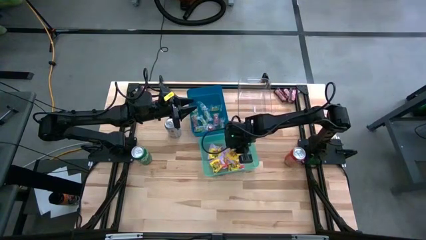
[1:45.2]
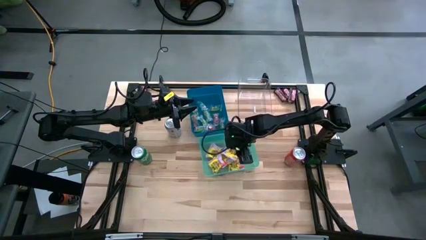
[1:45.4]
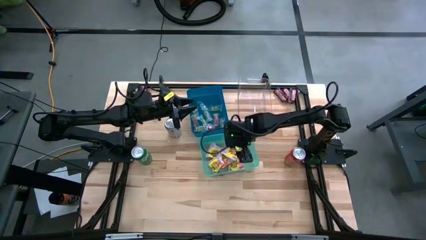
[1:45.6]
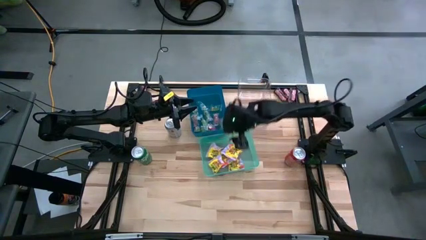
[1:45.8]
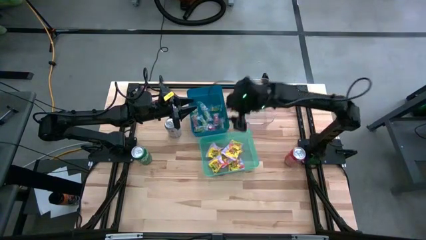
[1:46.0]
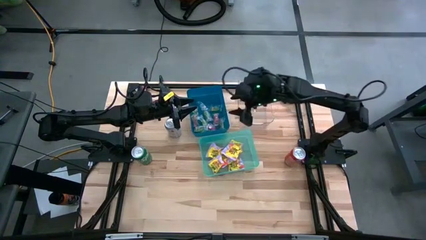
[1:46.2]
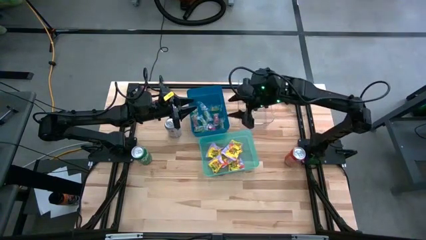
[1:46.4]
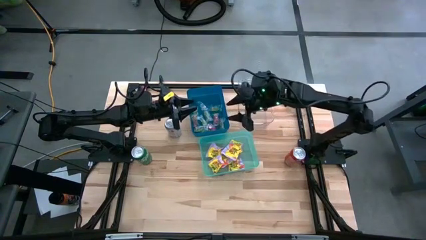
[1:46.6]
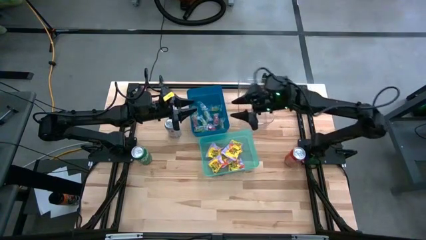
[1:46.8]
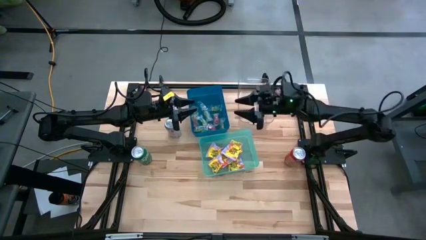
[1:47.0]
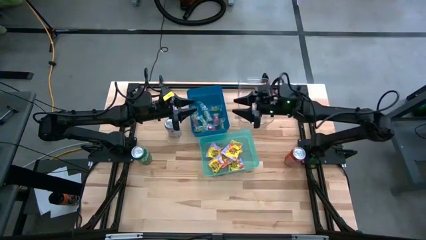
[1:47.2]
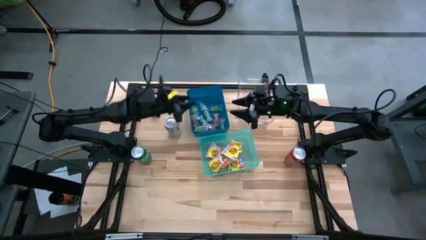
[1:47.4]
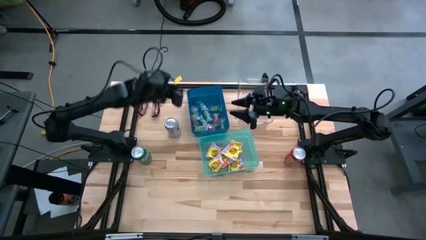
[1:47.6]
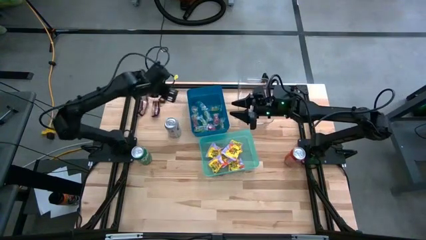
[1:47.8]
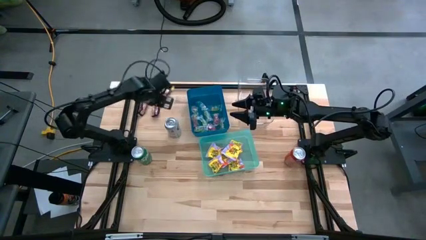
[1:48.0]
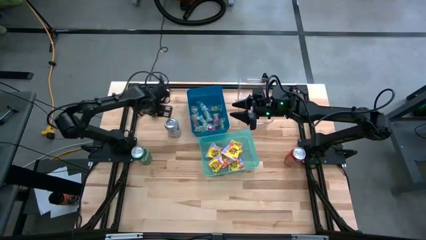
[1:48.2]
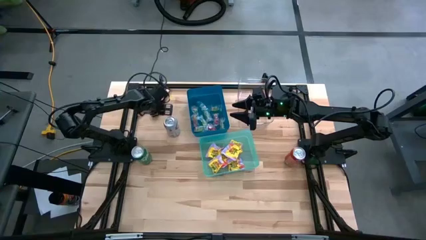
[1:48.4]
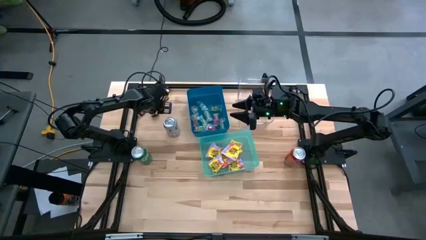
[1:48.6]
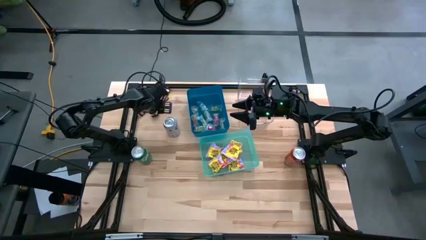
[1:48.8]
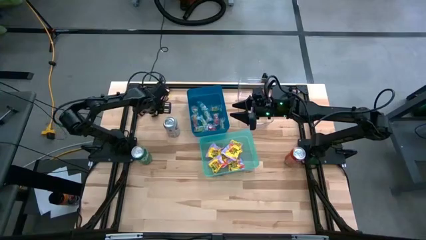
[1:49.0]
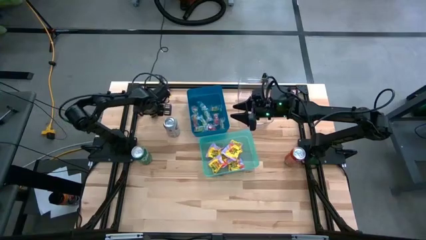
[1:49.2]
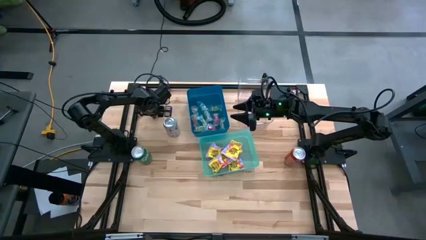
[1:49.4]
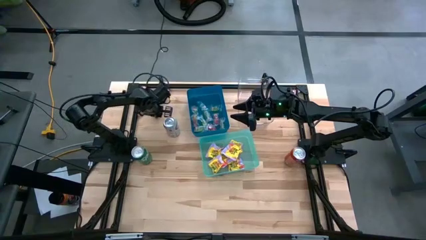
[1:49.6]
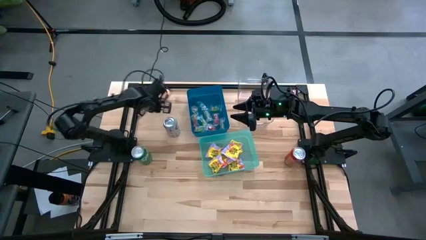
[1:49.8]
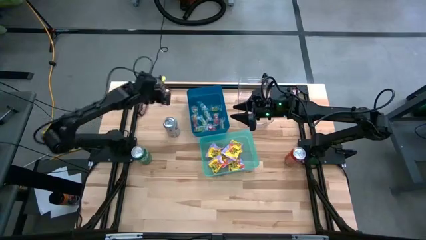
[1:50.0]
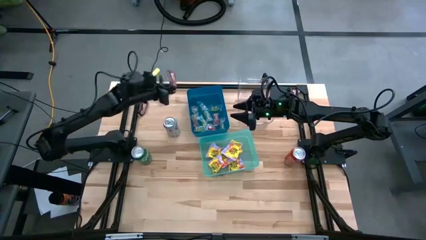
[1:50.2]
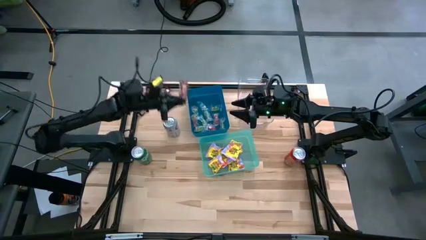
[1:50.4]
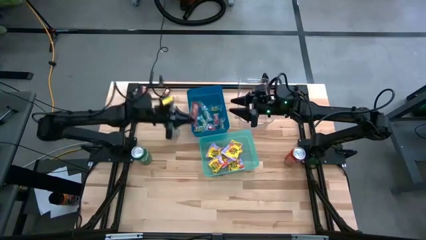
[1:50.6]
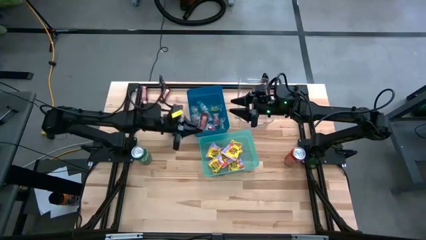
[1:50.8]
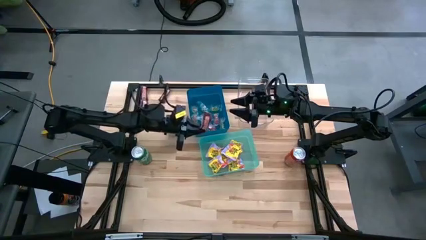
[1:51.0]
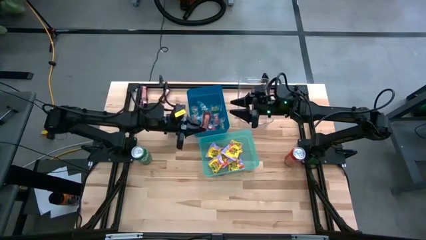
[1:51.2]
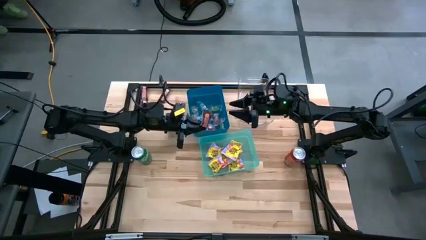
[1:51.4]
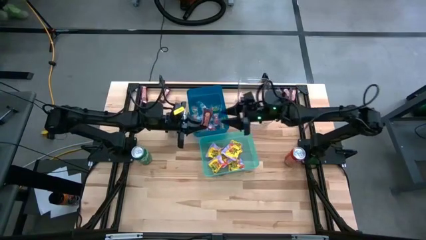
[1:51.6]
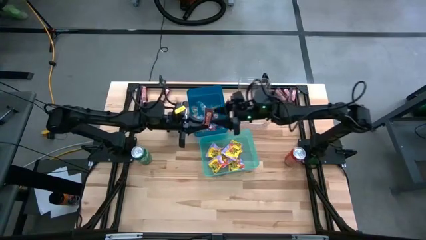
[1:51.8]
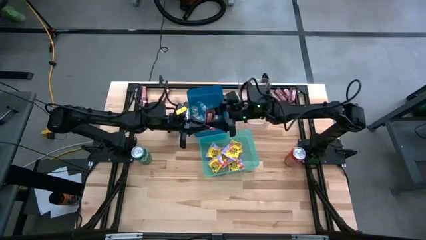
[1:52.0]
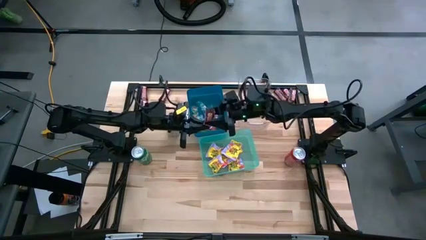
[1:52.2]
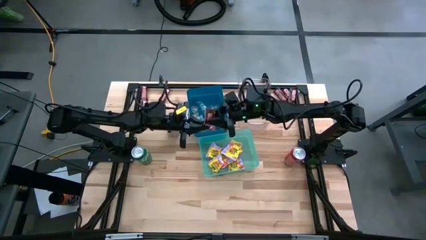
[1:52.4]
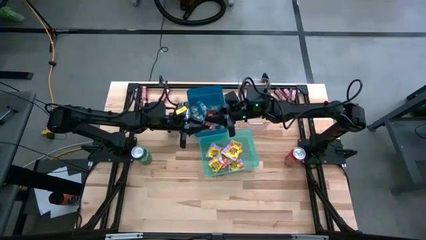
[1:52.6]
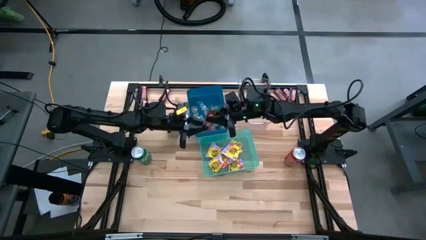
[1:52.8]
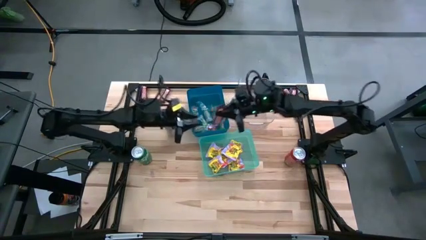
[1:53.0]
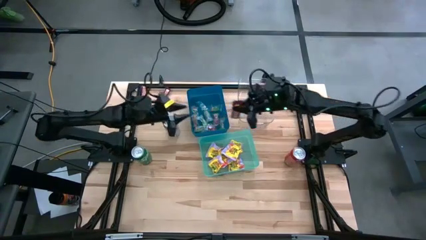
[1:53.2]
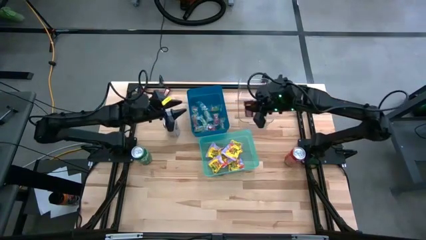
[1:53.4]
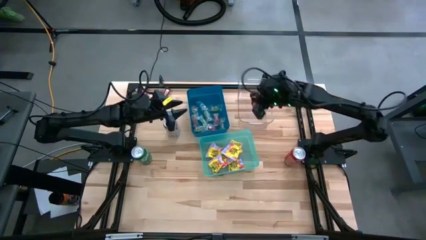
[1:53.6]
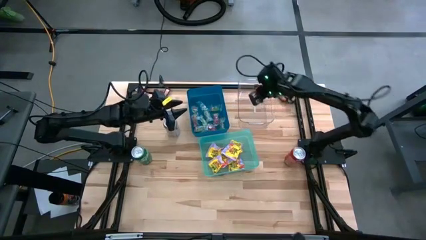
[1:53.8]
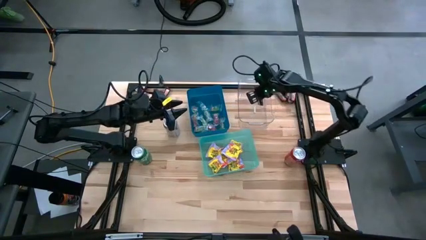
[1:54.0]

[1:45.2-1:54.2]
Task: Sort candy
Put the brown candy into the transparent bin

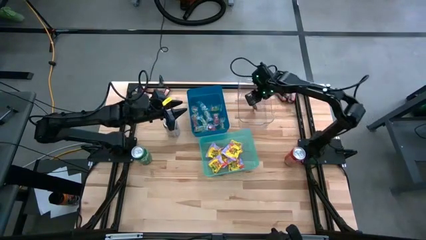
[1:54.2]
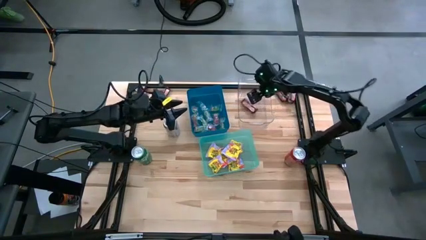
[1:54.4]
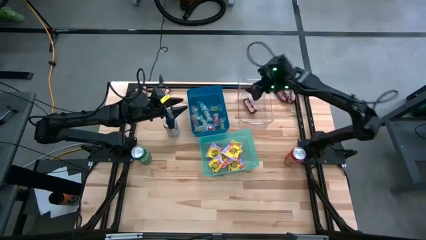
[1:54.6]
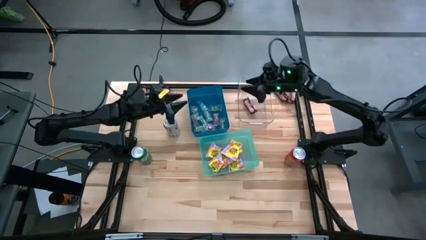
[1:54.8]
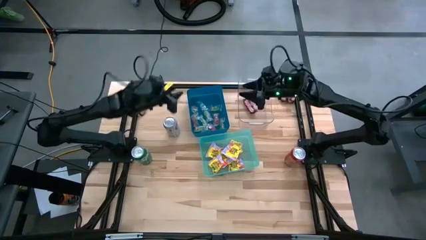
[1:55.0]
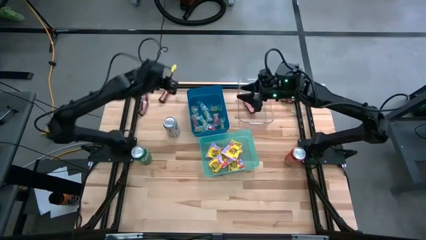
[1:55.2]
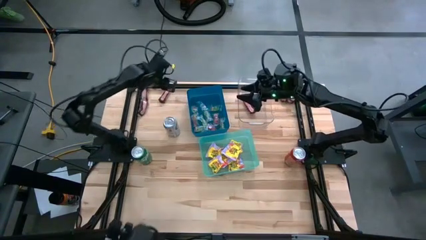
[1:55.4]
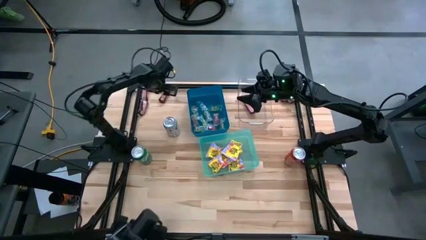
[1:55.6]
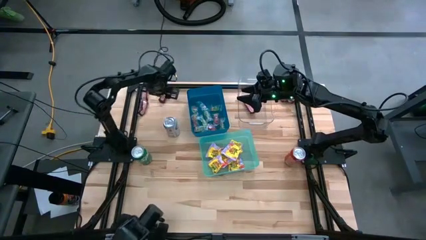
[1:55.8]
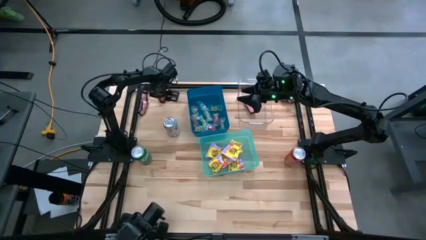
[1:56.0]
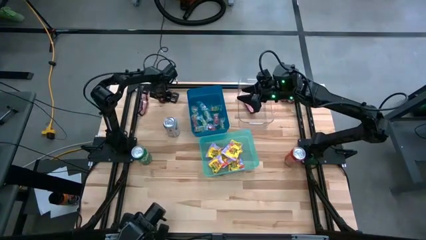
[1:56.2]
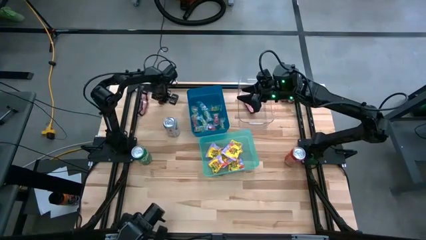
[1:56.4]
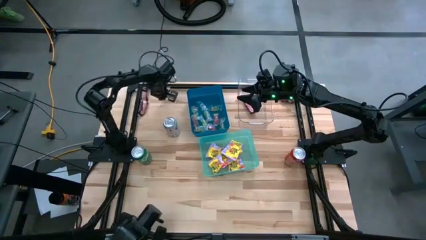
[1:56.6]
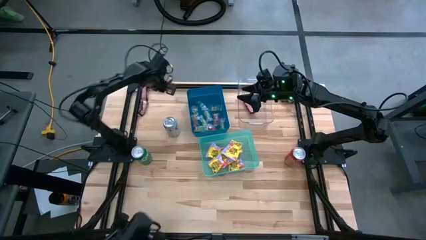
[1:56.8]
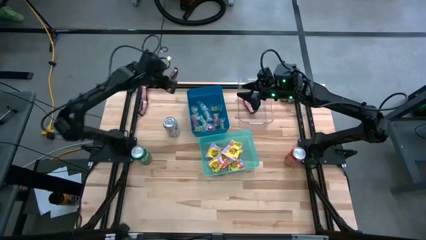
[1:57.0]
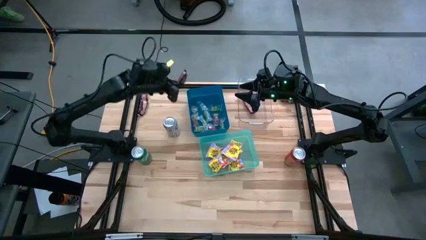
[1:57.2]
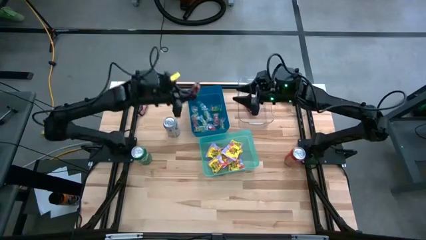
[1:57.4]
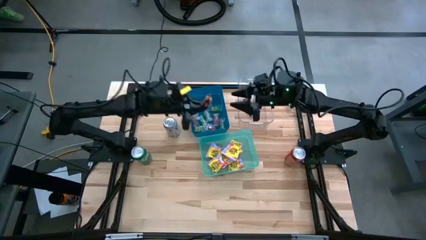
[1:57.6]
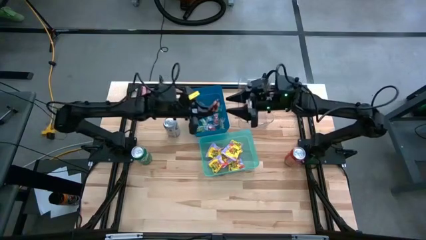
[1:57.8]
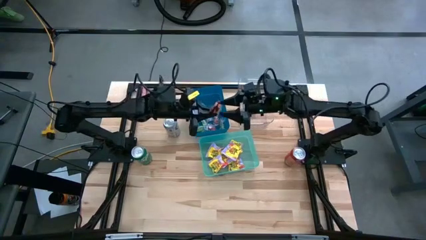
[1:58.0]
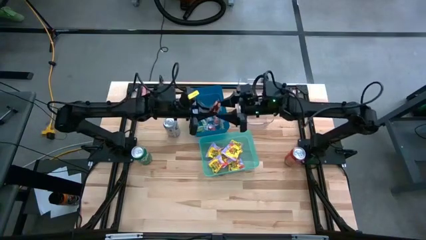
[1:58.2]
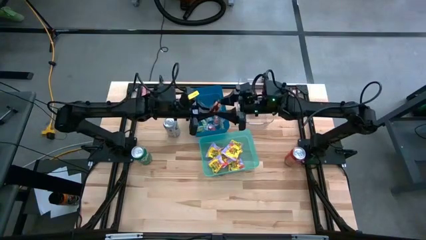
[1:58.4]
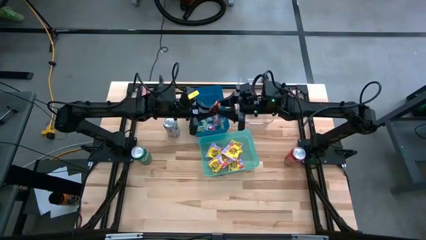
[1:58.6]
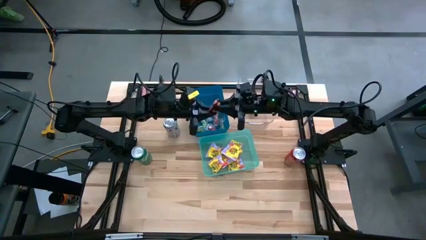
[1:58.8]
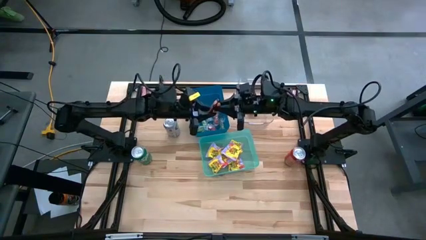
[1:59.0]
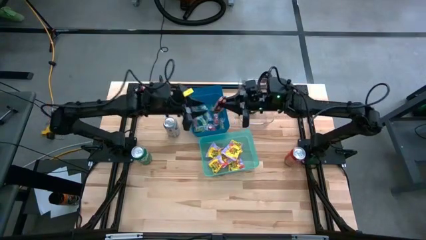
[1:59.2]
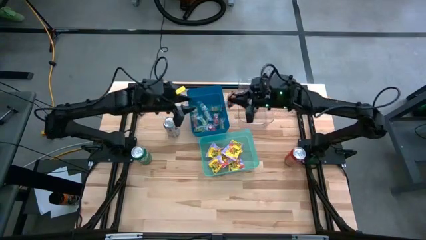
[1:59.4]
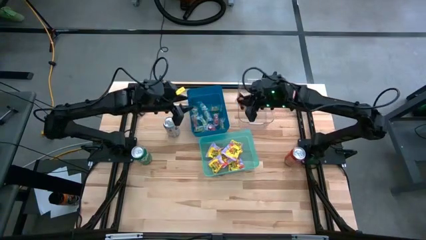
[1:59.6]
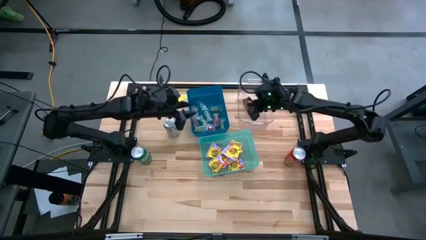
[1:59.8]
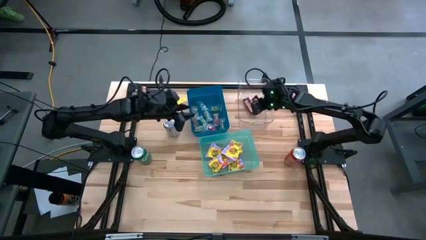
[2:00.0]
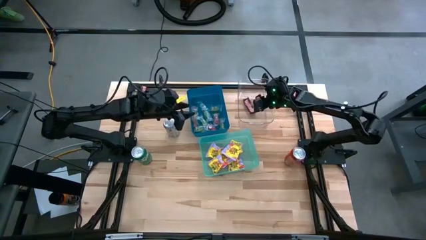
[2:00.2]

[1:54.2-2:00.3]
Put the brown candy into the transparent bin

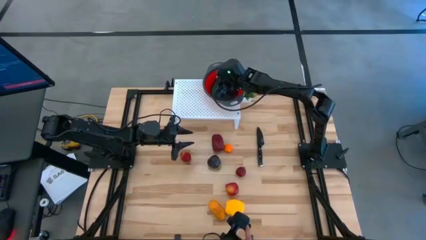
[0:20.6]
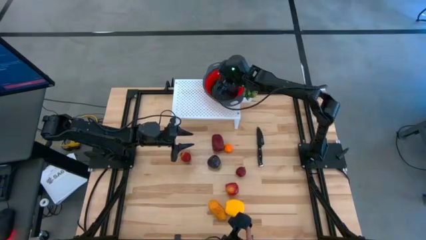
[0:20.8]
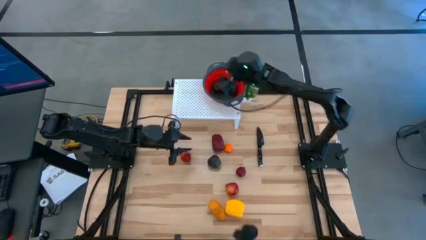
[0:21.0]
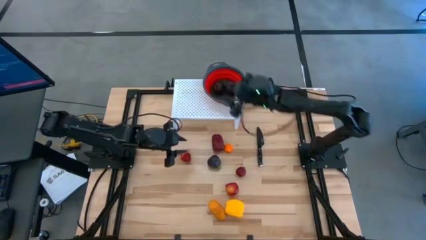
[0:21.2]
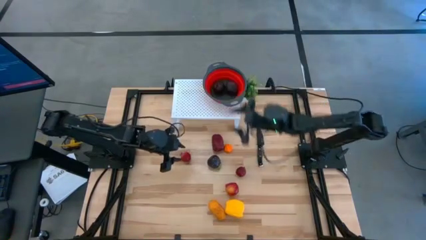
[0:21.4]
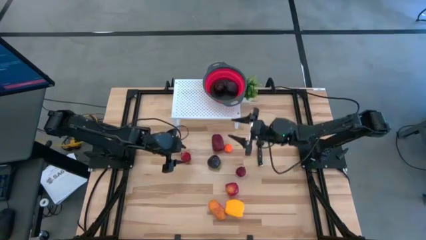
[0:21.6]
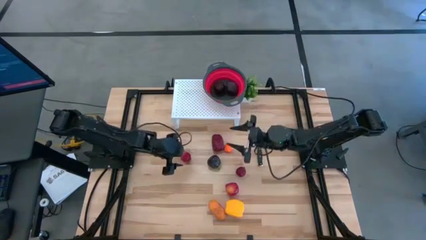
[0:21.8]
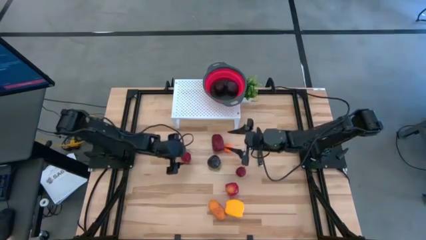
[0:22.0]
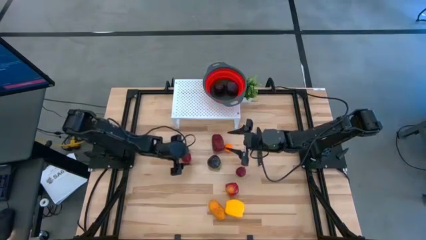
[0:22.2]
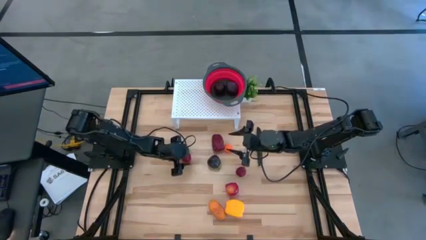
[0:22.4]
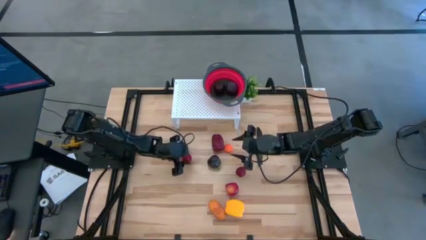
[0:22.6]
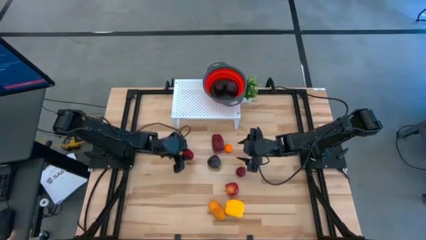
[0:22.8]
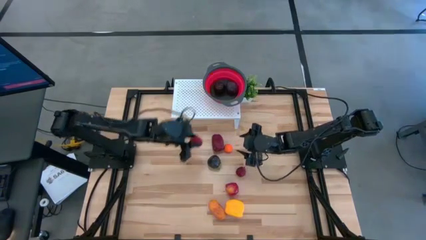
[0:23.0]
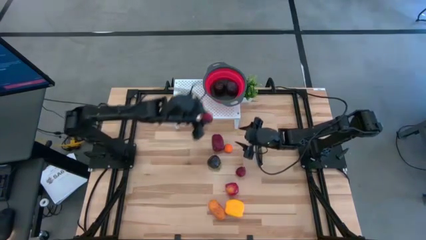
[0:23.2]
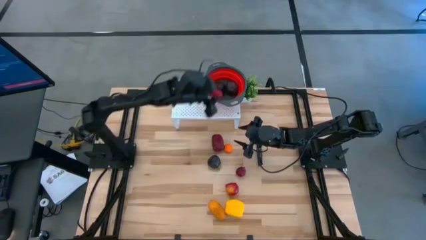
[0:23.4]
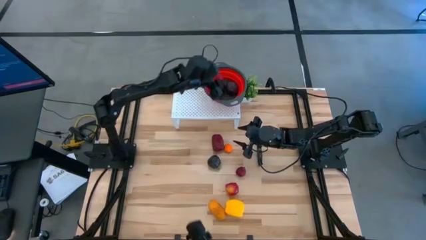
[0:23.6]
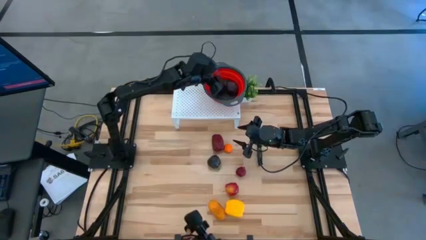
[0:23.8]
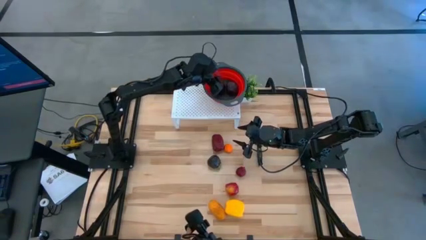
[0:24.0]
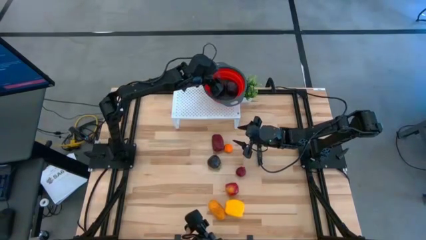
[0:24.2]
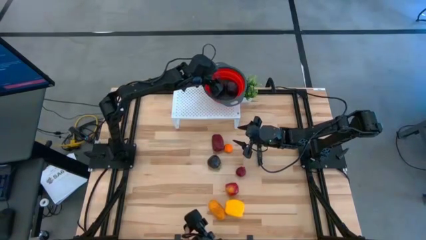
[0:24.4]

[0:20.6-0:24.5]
Task: Pick & Place Fruit
Put the left red pomegranate into the red strainer bowl
